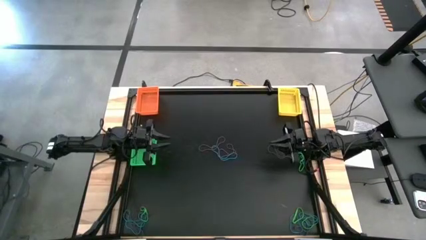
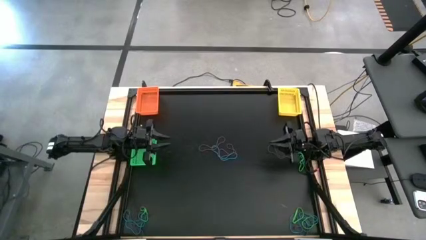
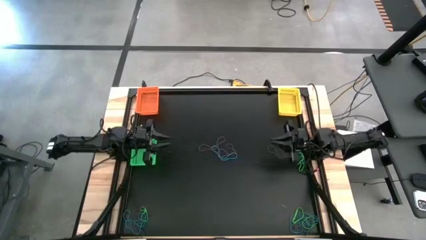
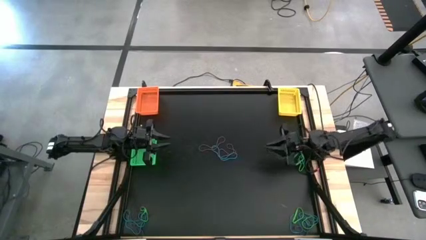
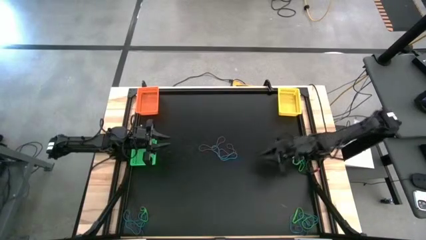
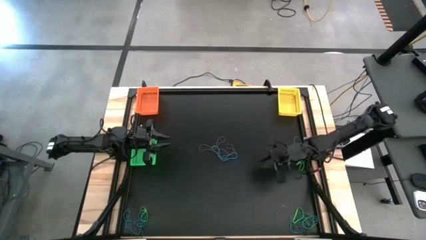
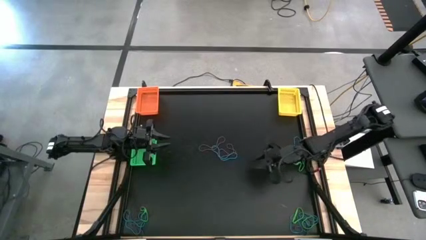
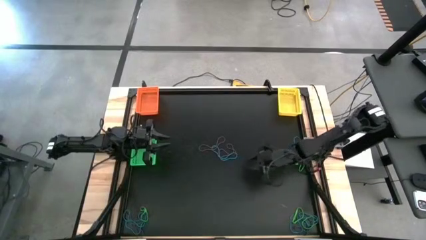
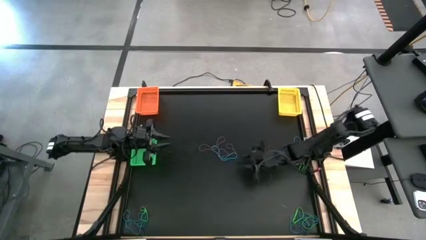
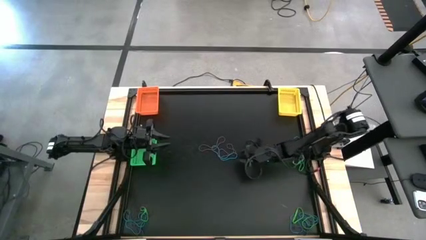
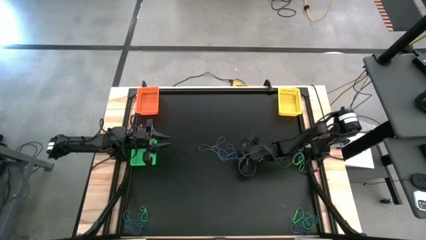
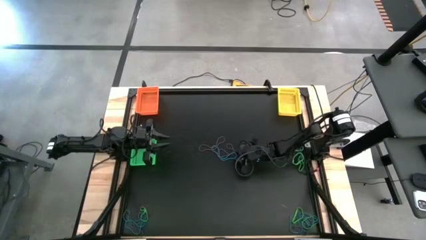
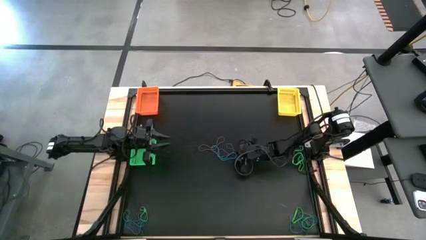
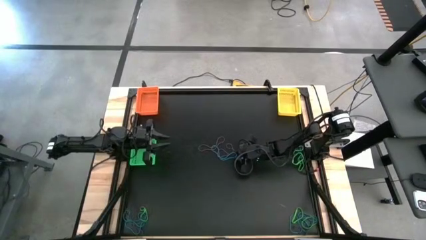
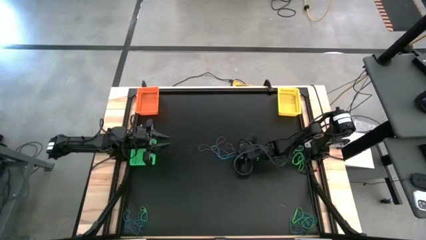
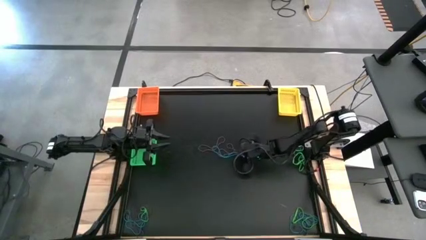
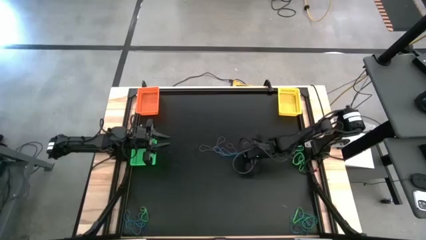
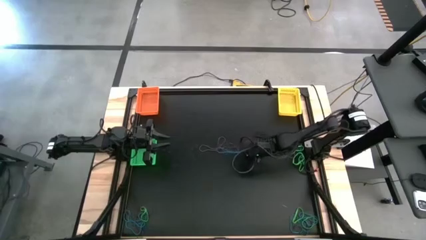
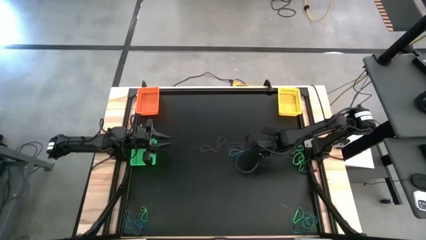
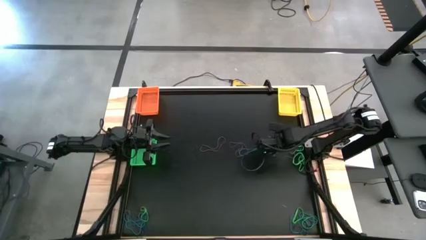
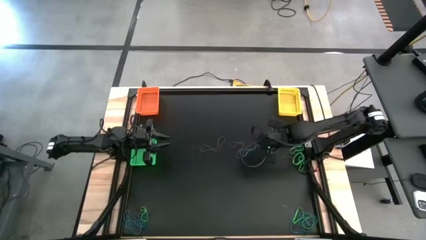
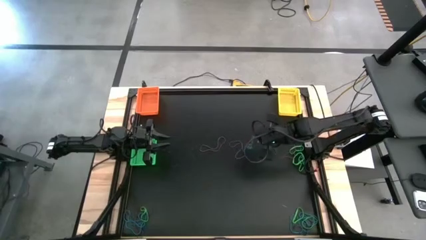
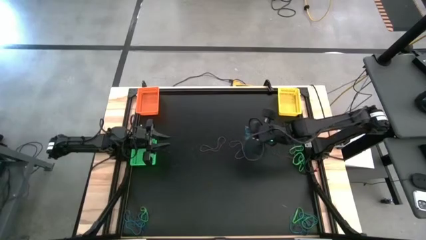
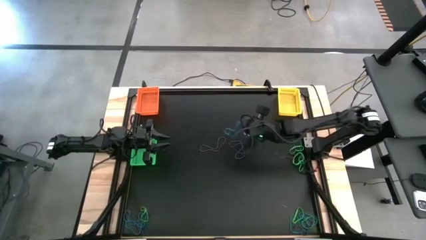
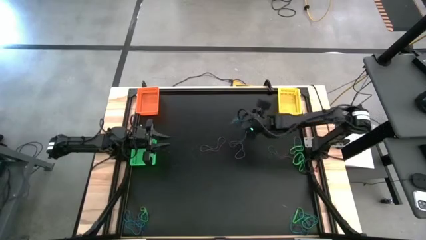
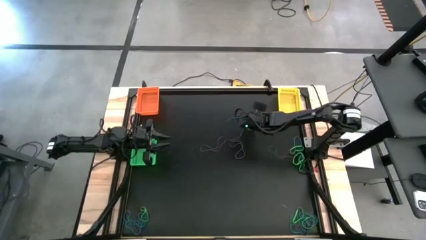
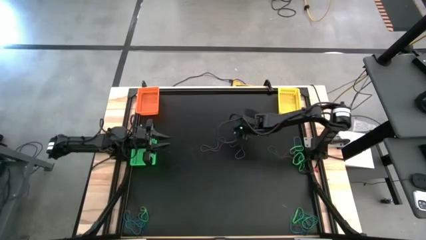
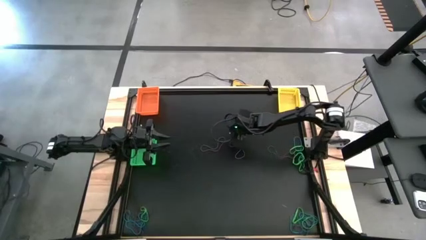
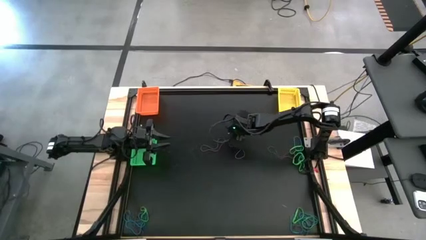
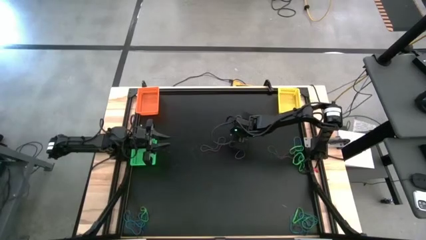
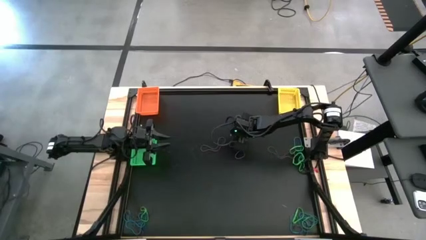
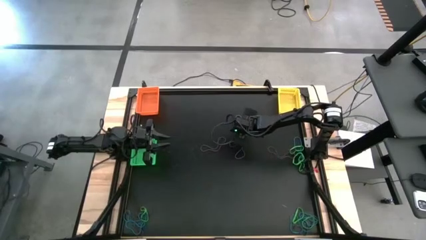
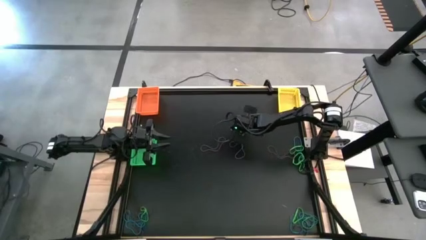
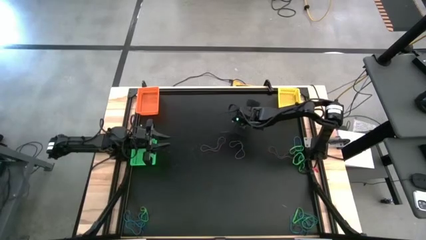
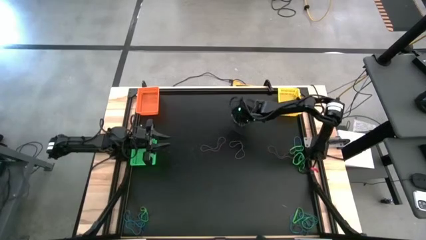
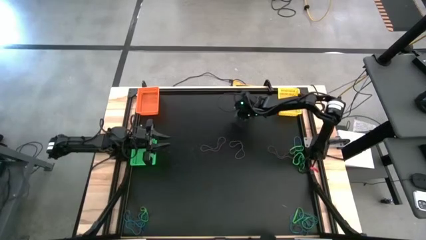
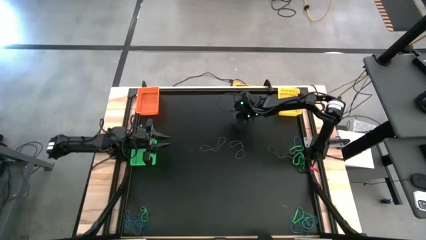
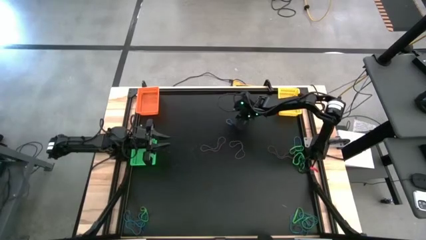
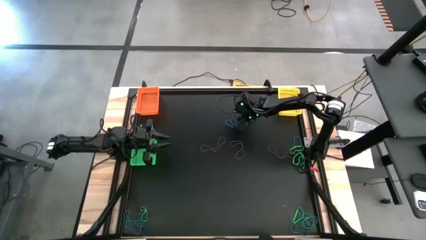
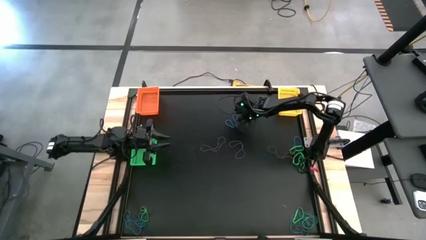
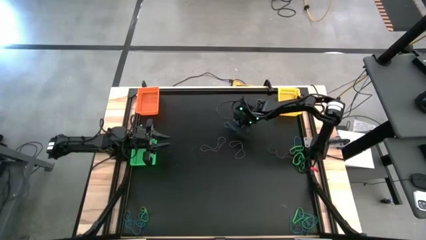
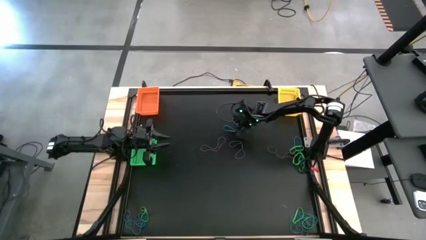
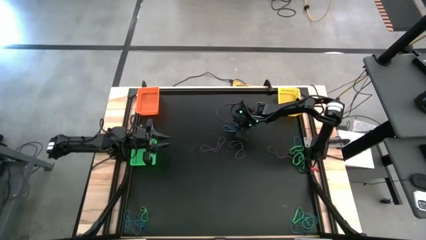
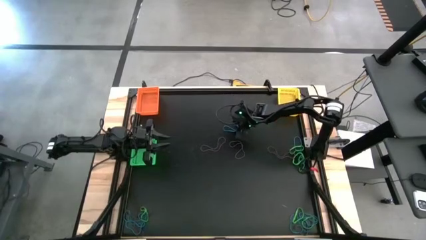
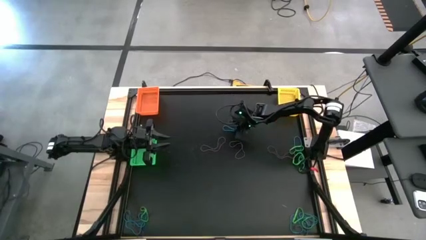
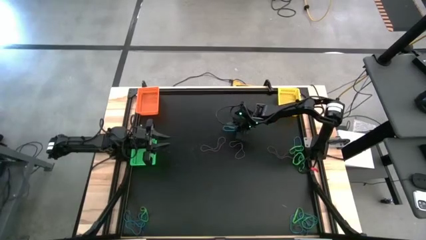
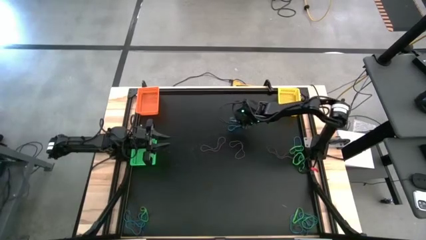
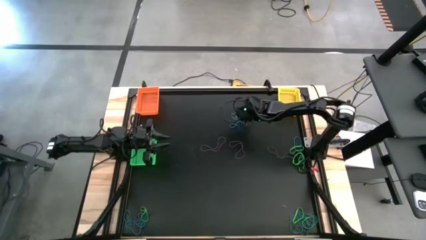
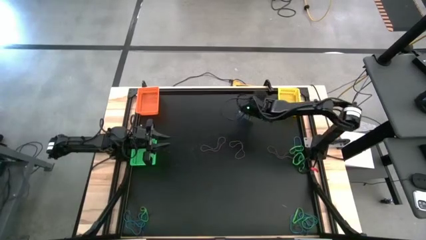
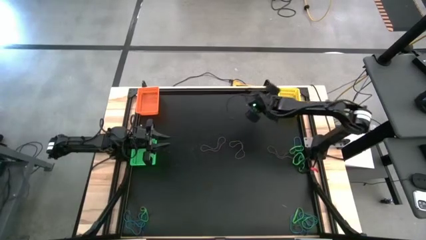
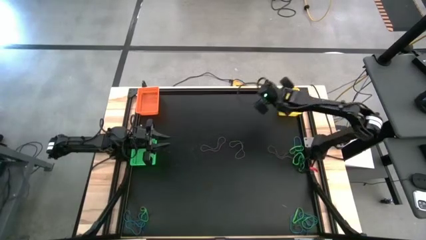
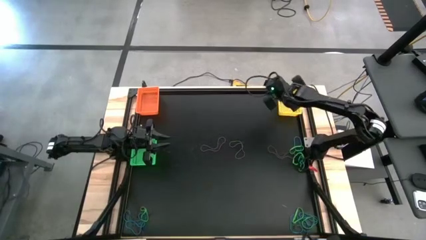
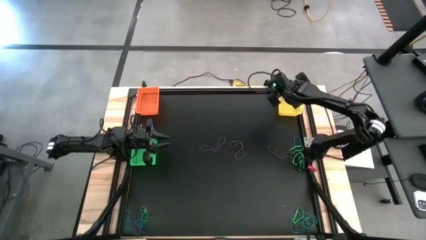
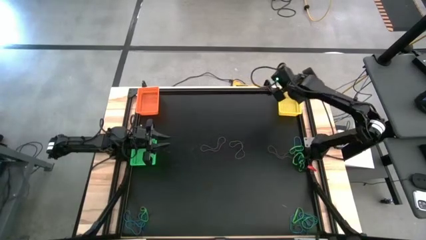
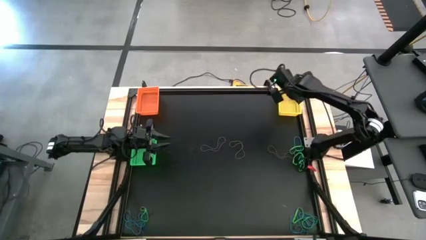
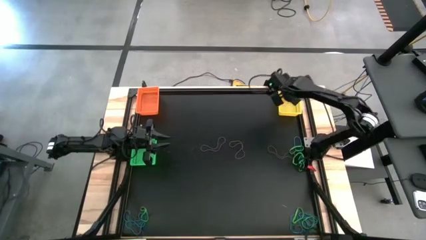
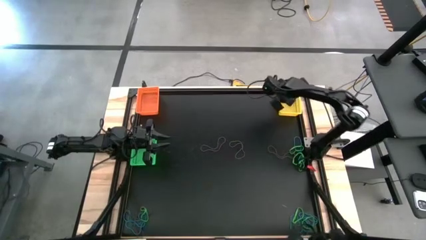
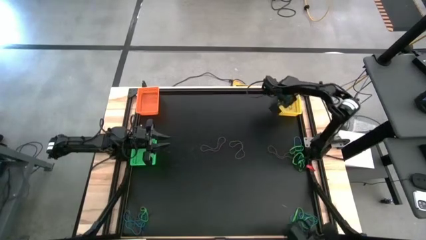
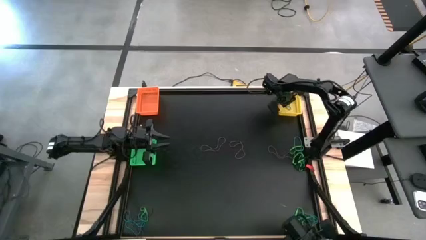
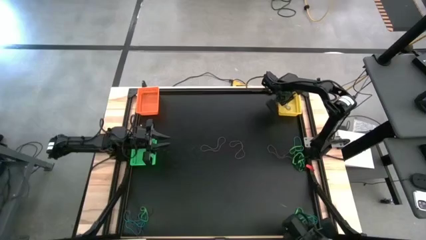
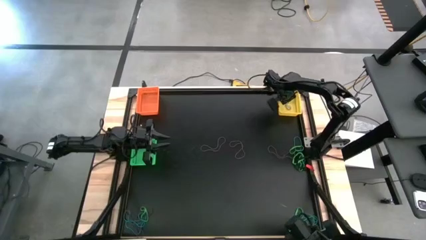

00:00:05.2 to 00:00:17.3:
Task: Sort rubber bands into baskets
Put the center blue rubber band into the yellow bin

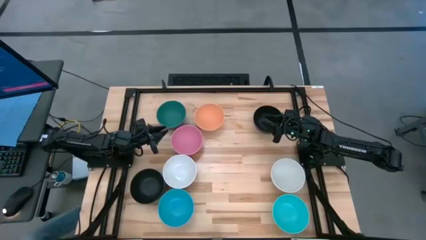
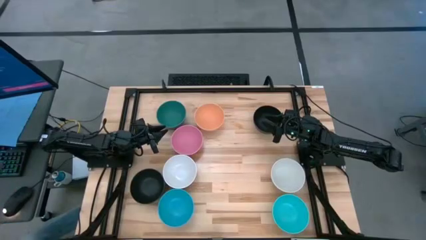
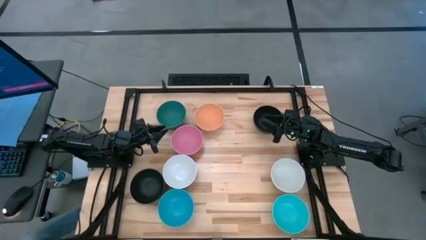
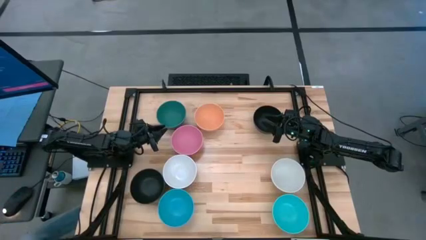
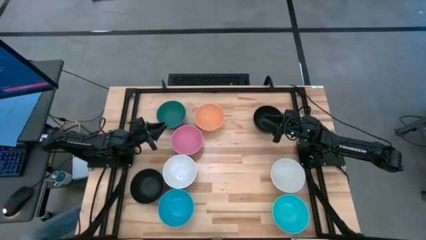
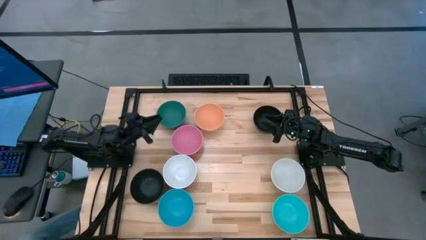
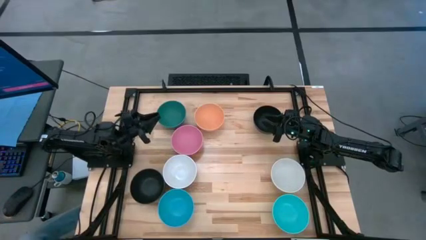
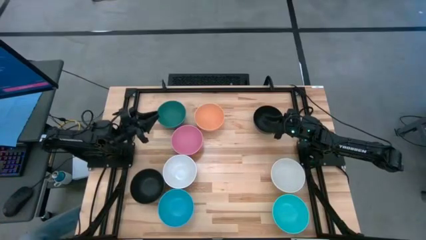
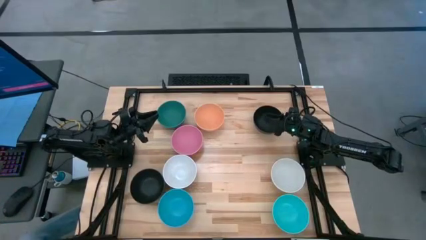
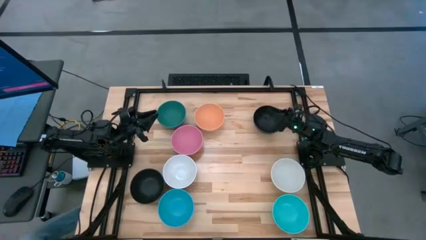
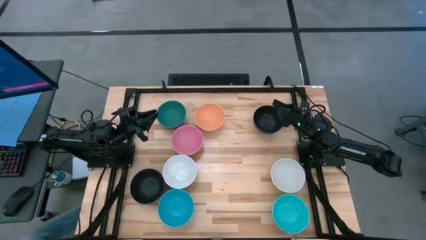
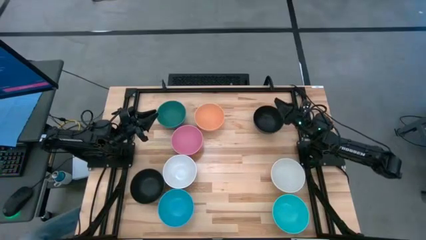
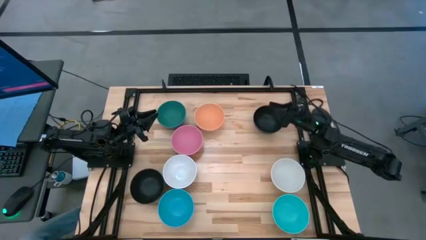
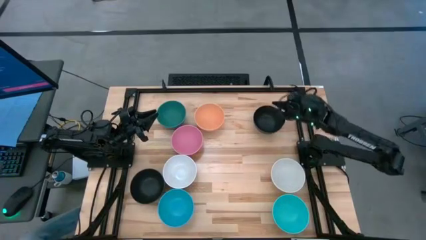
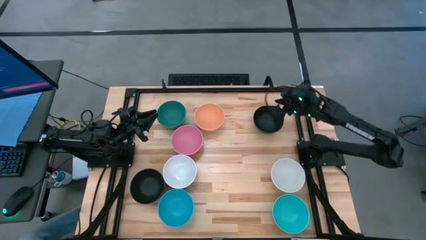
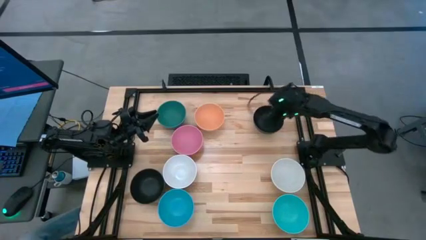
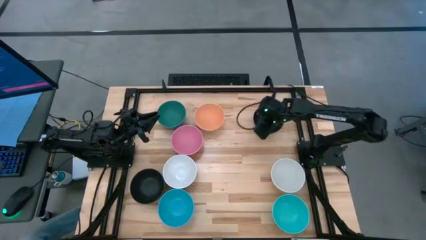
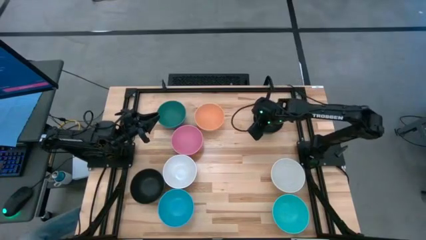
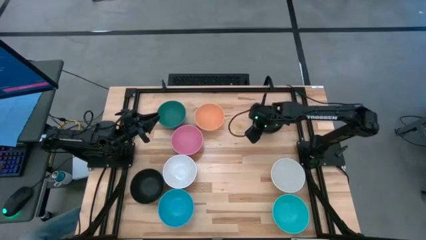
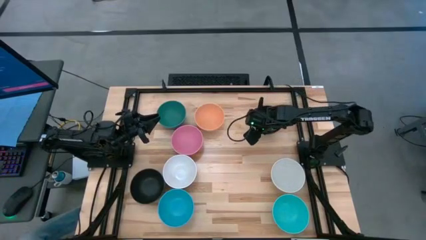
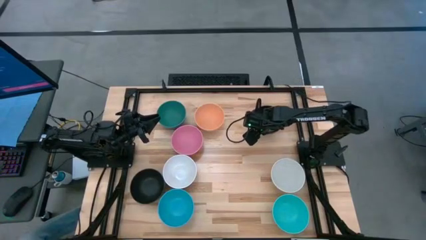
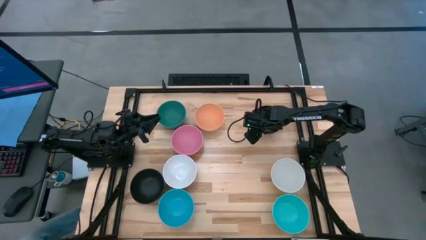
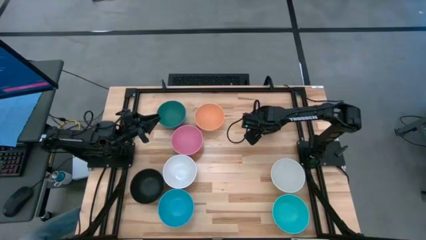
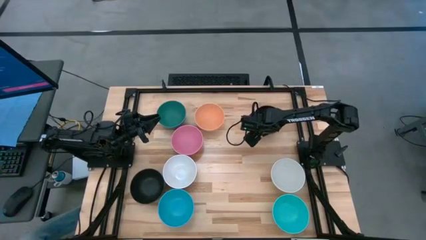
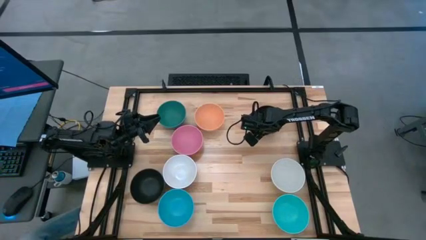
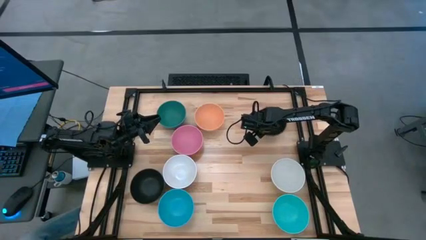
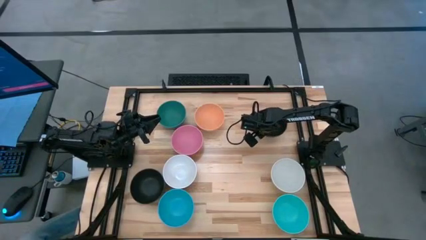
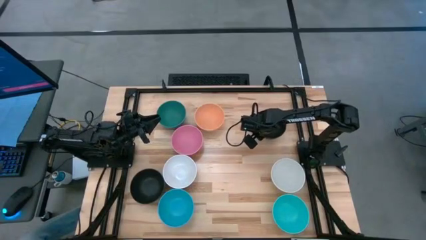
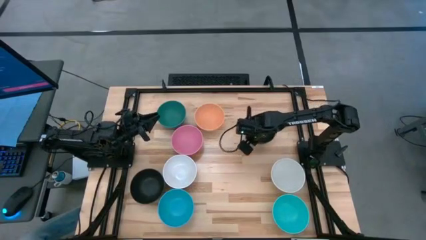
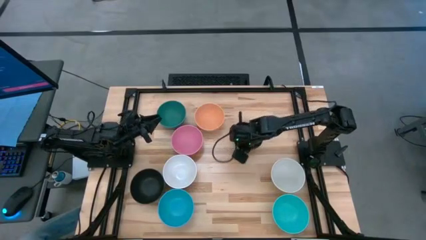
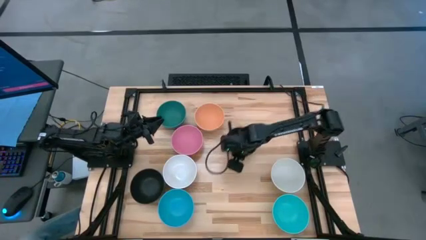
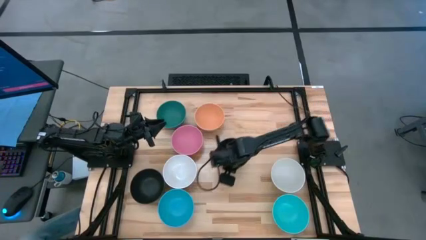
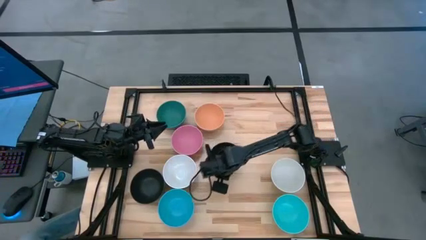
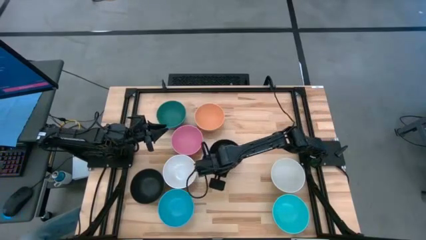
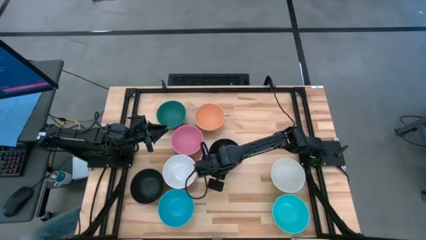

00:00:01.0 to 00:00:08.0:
Task: Nest bowls inside each other
Move the top black bowl to the center of the table
